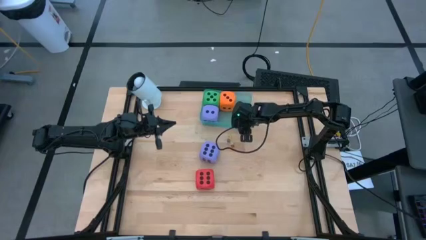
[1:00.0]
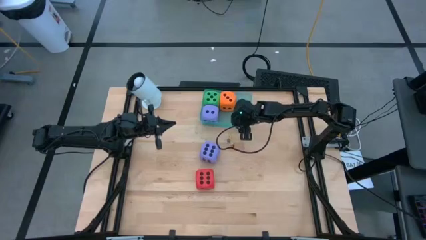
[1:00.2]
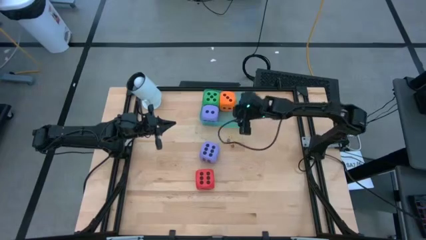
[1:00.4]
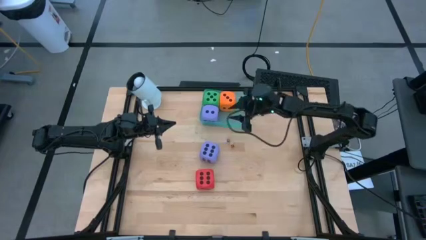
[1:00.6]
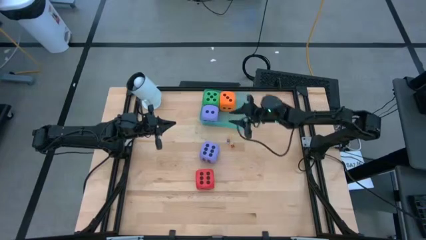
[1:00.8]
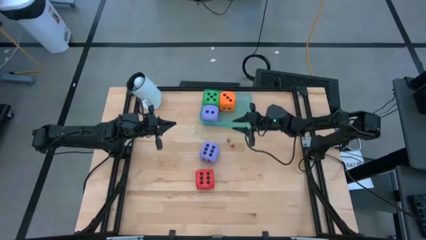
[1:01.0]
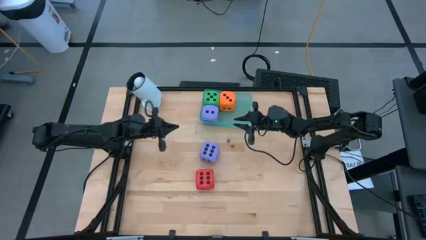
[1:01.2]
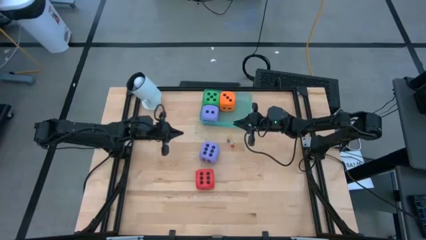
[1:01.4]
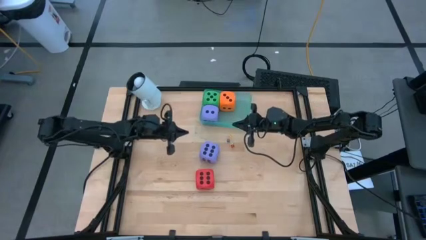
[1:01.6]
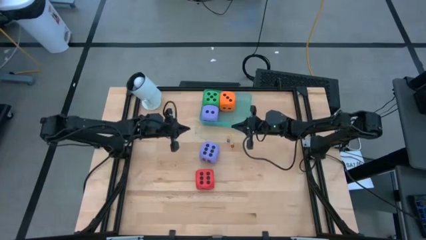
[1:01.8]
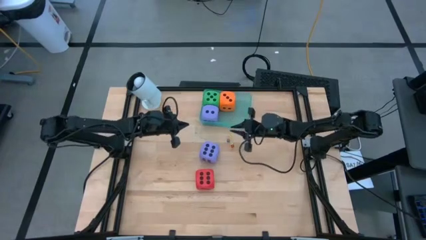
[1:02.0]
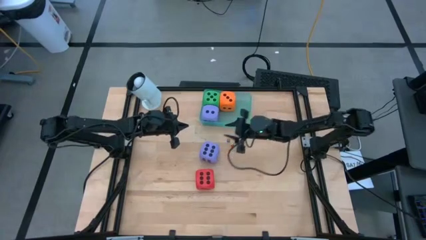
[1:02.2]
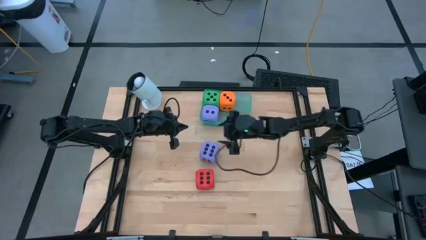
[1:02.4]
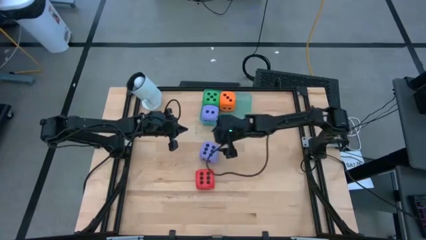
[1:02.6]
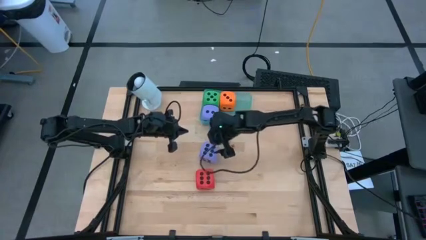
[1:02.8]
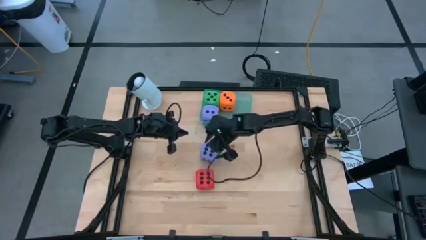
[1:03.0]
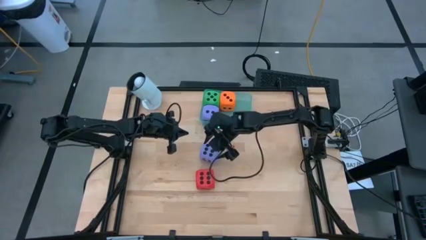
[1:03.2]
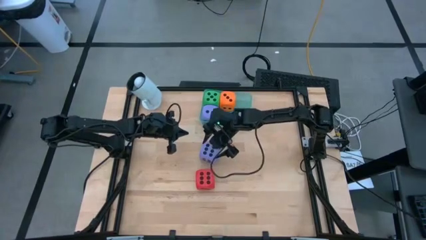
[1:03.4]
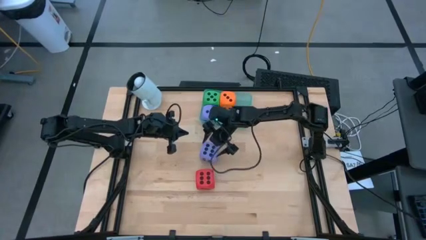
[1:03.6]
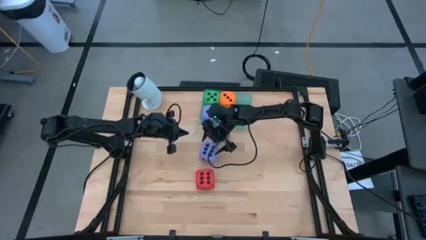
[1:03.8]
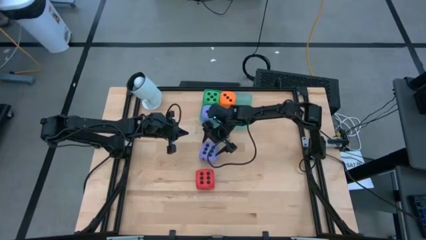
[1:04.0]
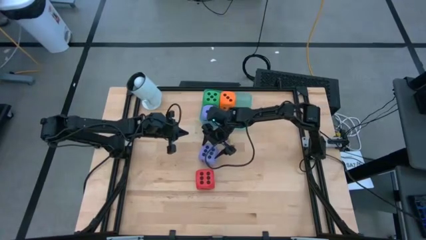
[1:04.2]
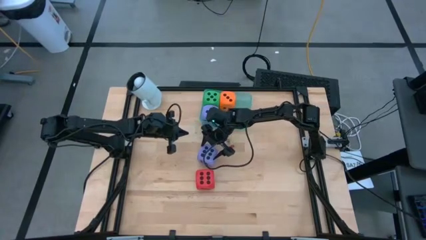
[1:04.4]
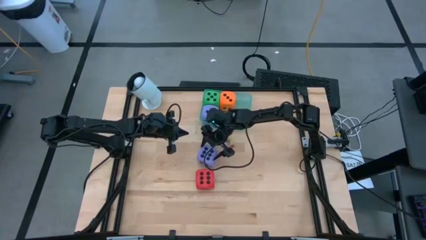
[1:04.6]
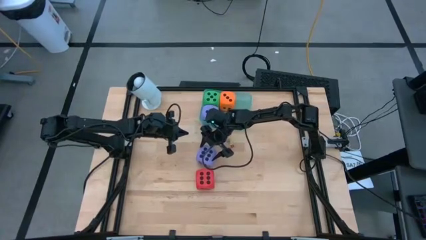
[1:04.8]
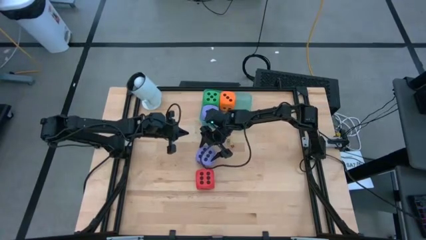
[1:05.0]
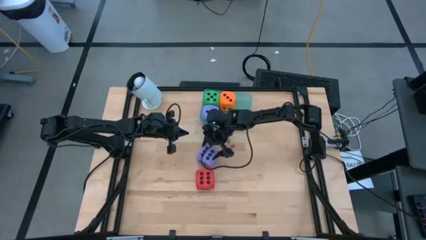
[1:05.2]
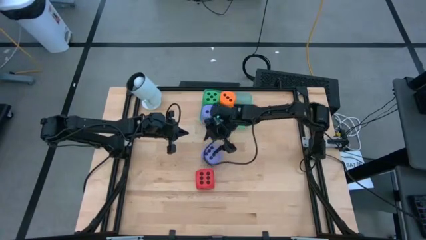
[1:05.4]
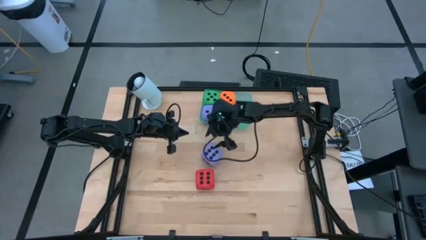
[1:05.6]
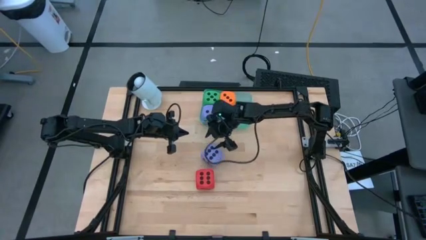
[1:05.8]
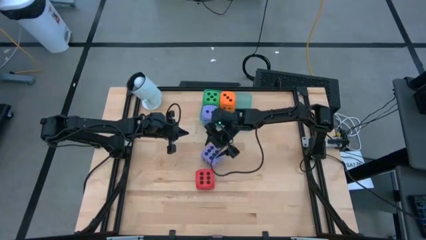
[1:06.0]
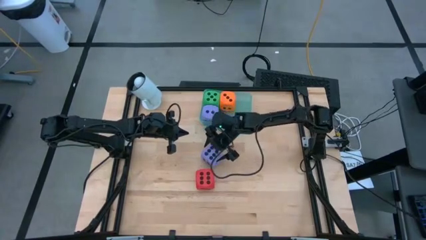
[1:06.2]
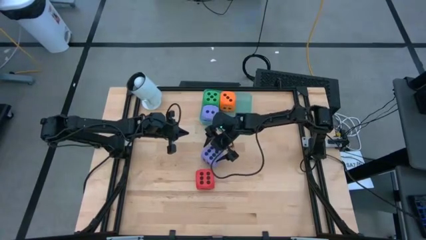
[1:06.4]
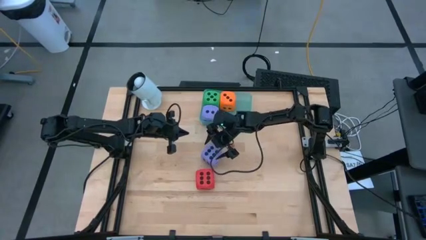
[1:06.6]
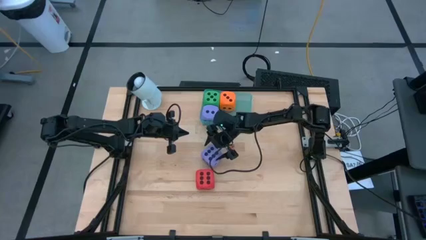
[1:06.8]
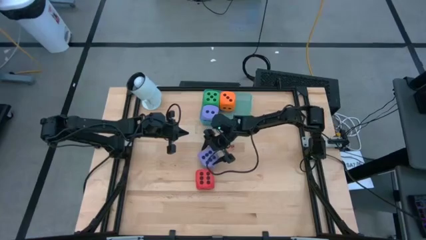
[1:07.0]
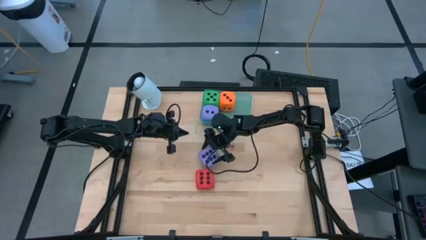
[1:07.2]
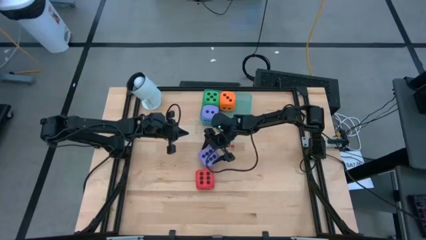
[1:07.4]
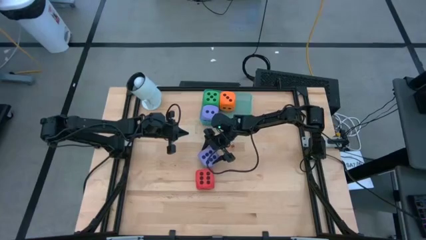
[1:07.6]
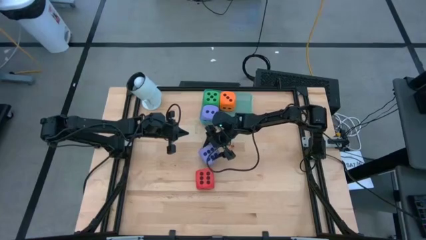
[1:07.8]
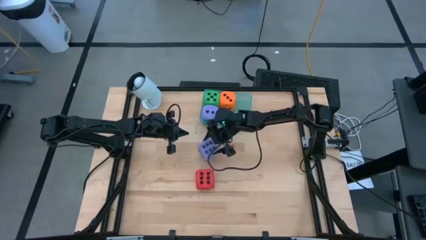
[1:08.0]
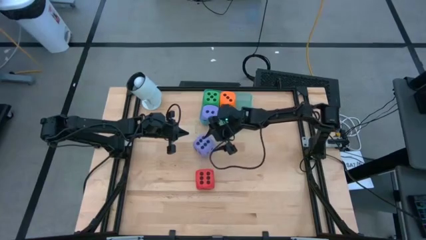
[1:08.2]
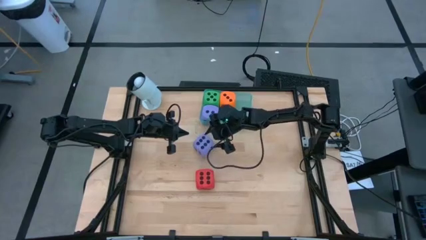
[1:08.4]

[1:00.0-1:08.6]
Task: Pick & Place Dice
Put the large purple dice into the green container
